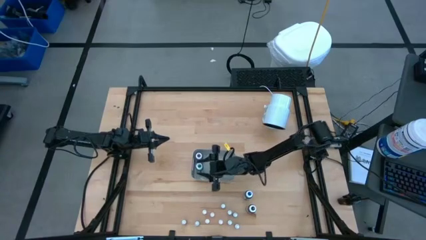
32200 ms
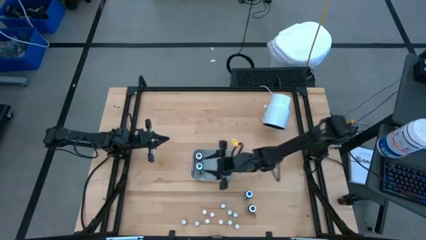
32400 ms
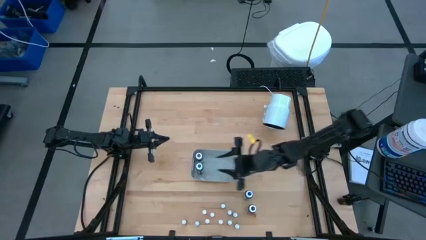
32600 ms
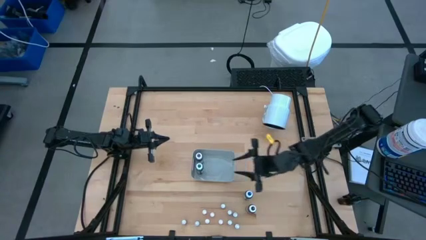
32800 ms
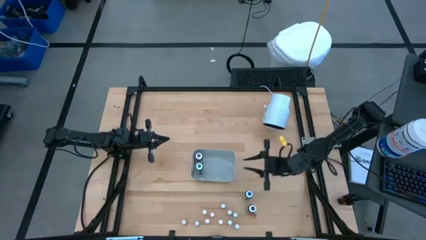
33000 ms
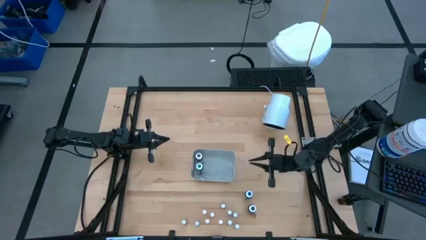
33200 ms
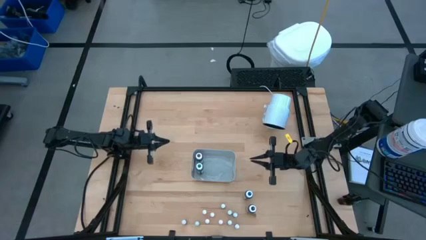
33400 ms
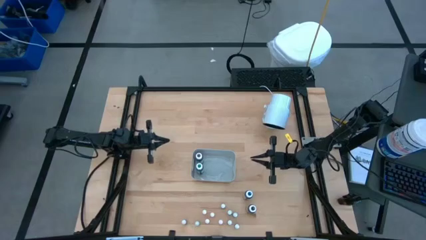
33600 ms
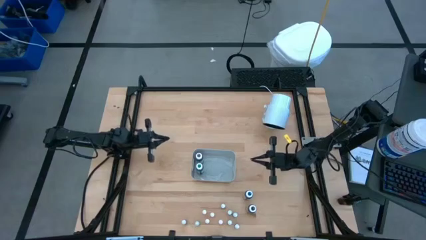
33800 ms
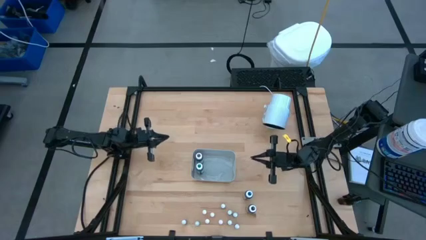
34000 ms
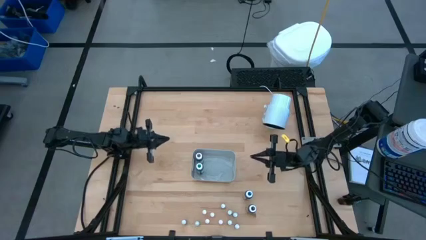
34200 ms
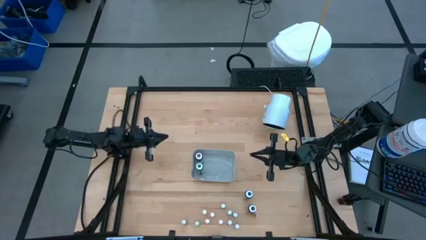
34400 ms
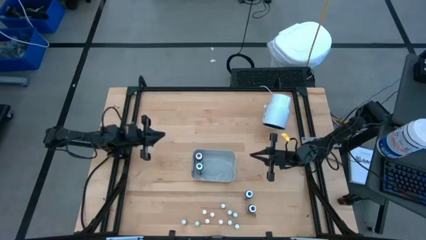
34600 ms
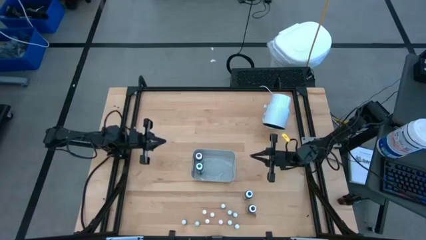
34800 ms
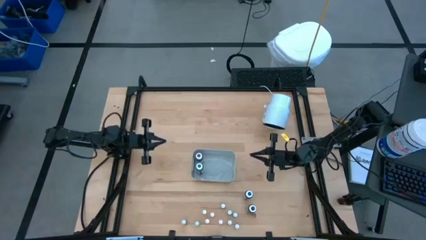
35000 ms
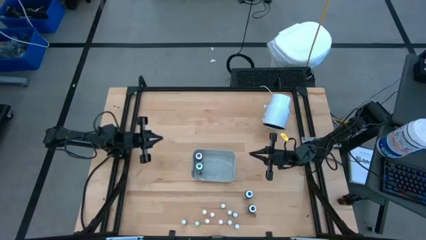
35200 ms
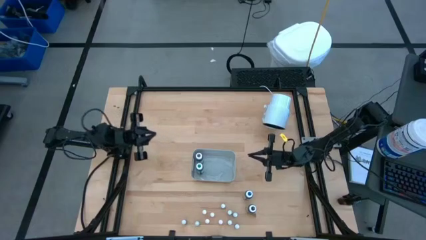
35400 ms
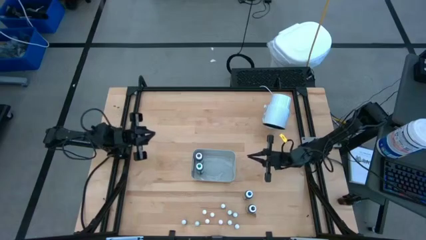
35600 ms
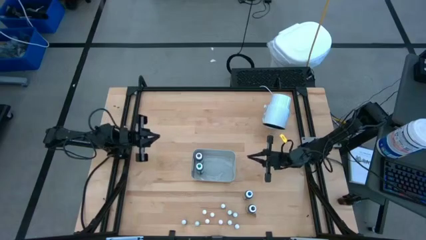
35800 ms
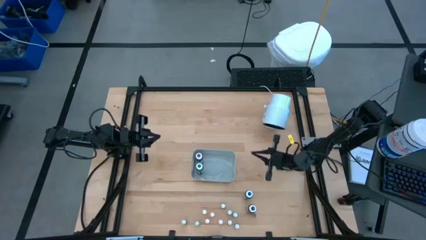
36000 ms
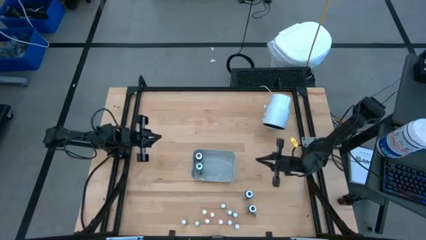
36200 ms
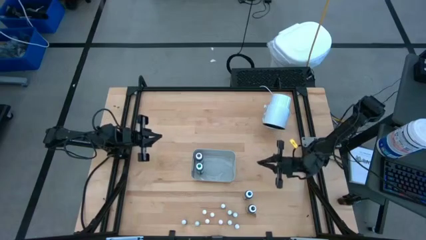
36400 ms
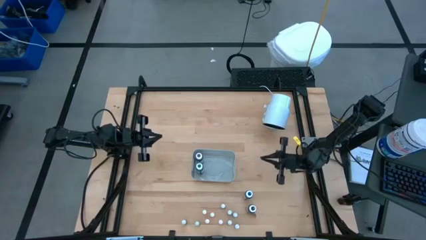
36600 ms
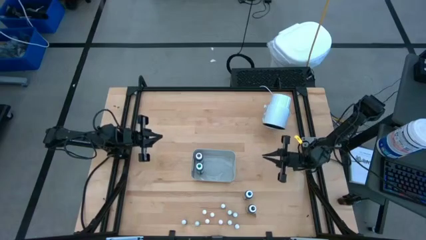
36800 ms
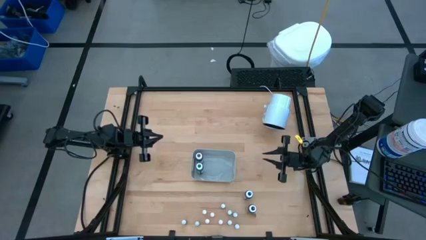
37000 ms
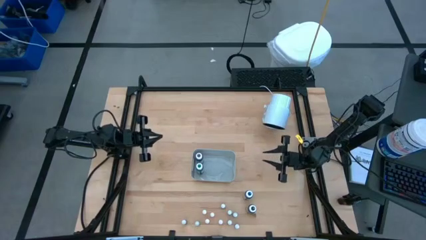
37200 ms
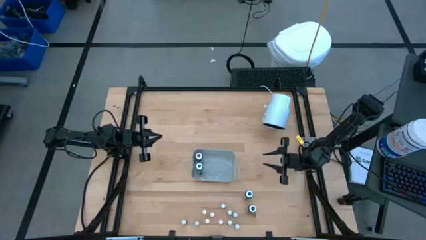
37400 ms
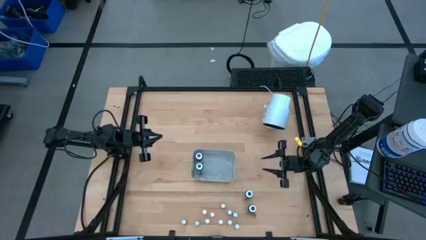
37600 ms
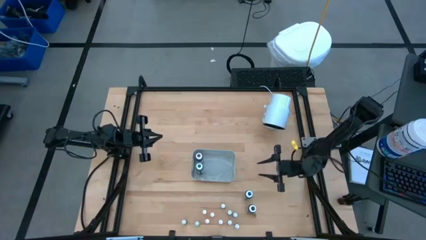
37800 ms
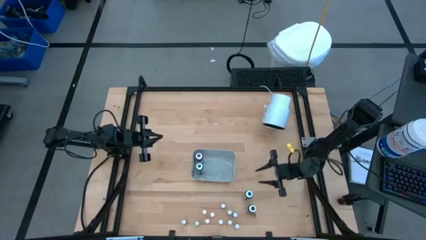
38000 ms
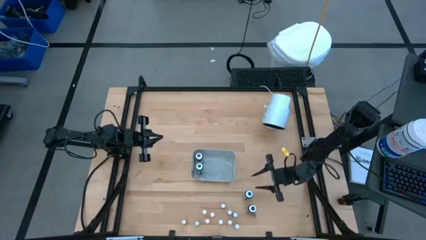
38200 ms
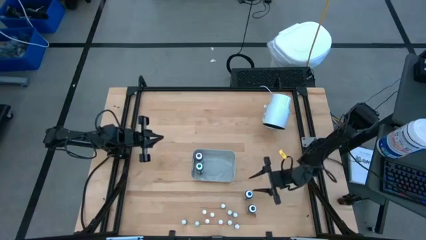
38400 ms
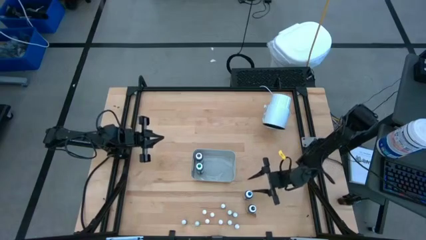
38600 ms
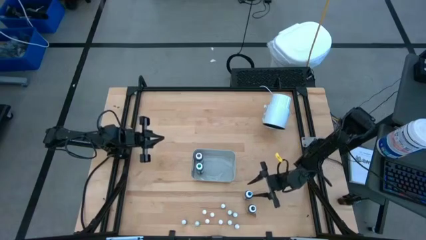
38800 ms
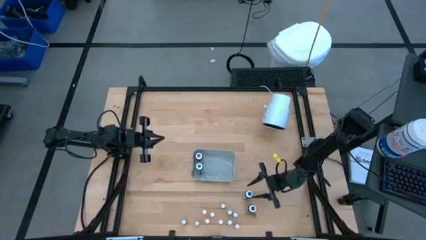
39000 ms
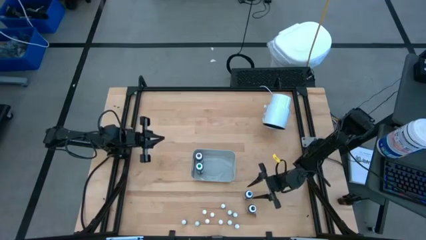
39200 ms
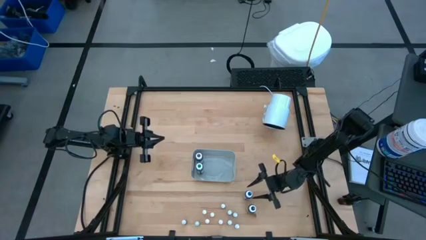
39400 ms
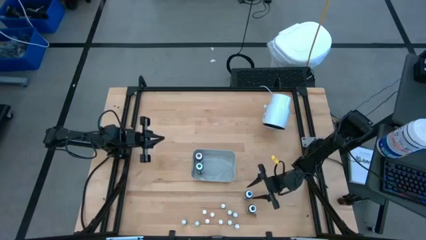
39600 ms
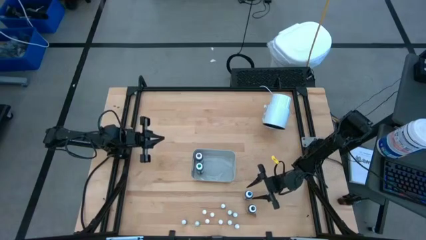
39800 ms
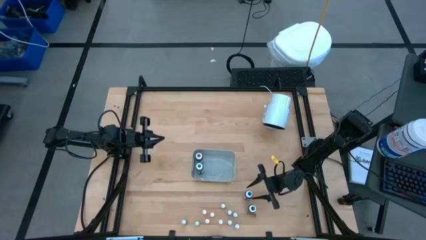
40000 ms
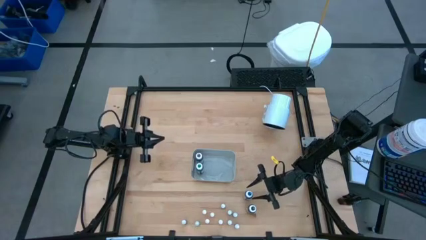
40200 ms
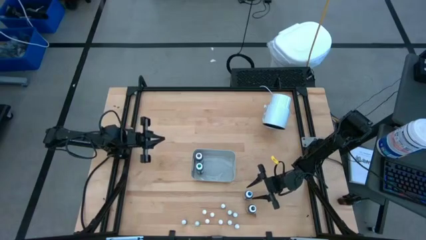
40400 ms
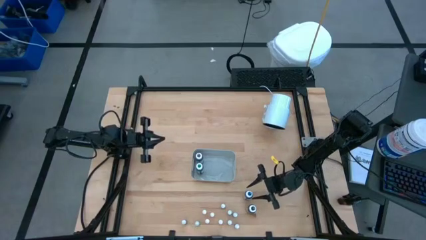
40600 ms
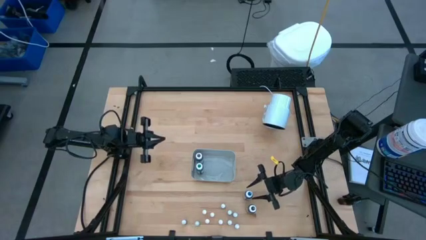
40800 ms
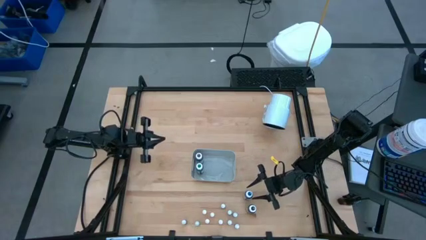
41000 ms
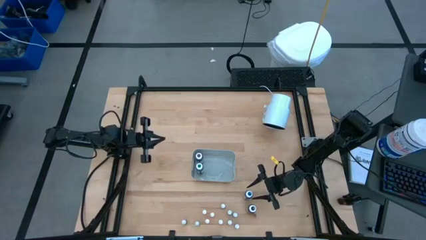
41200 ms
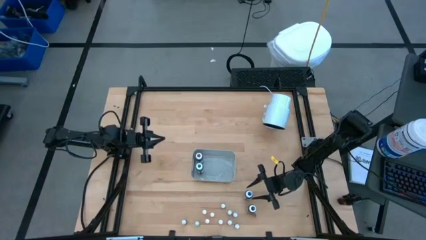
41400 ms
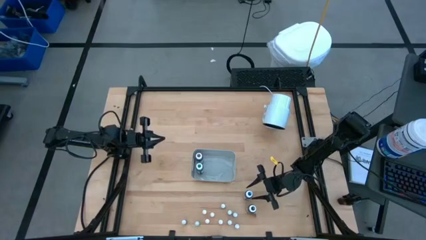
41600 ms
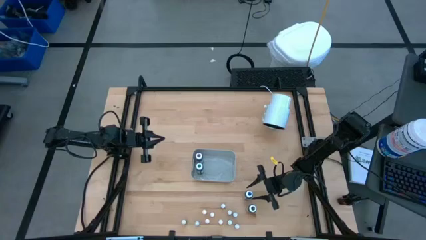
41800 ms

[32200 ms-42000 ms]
Task: Pick & Place food coloring
Put the big blue food coloring bottle into the gray bin

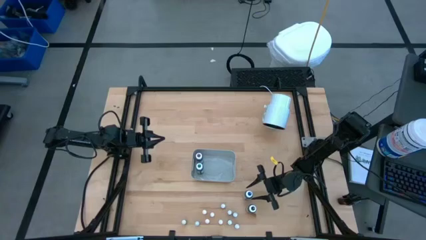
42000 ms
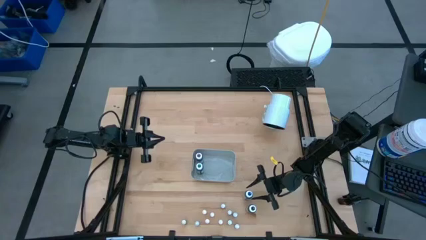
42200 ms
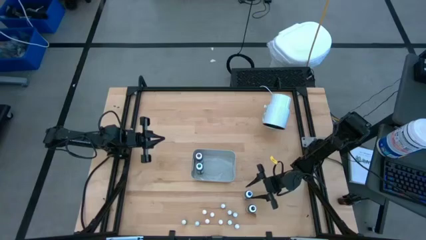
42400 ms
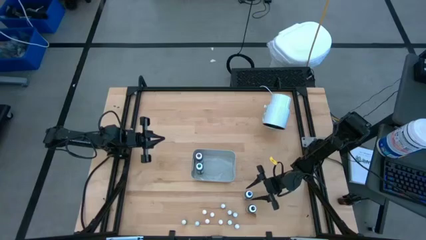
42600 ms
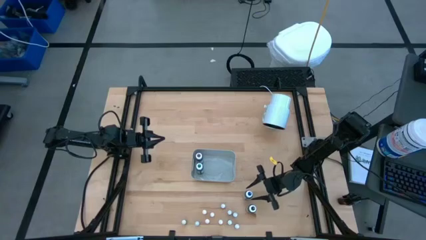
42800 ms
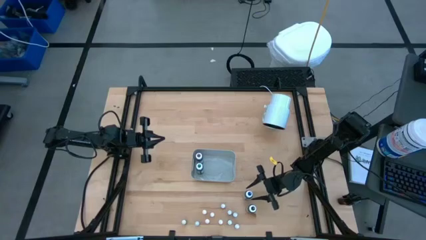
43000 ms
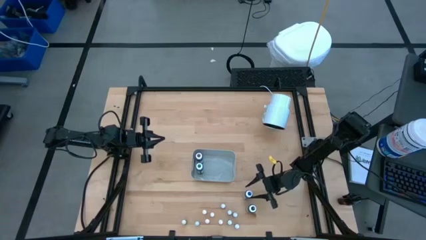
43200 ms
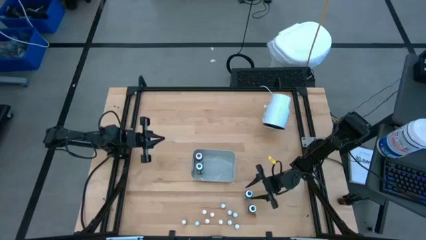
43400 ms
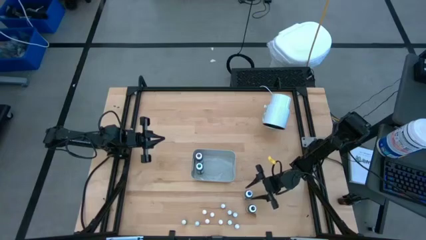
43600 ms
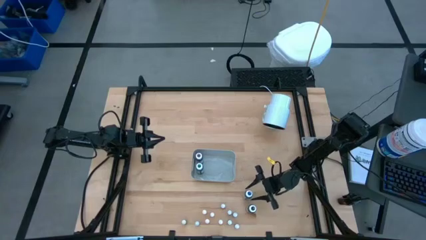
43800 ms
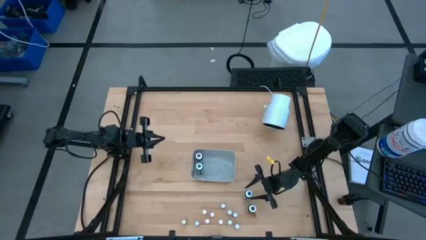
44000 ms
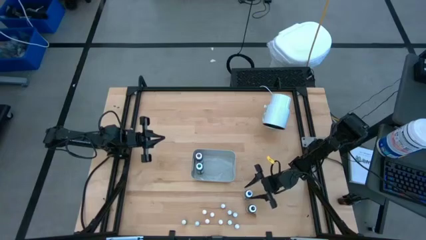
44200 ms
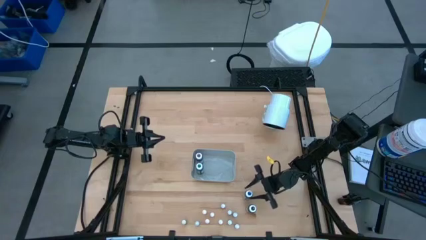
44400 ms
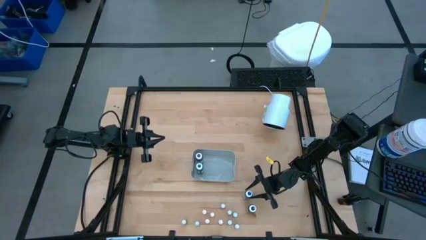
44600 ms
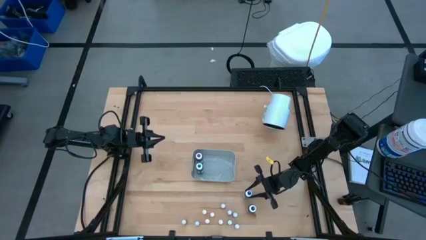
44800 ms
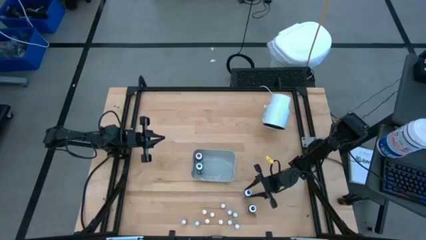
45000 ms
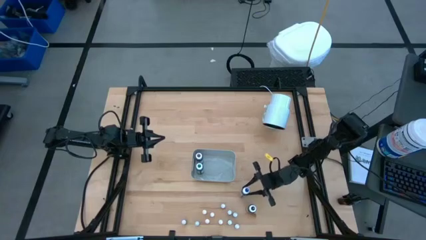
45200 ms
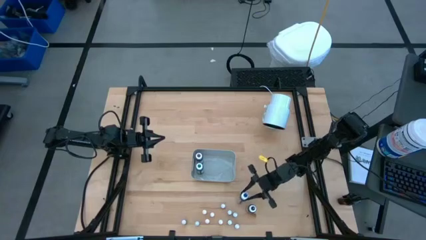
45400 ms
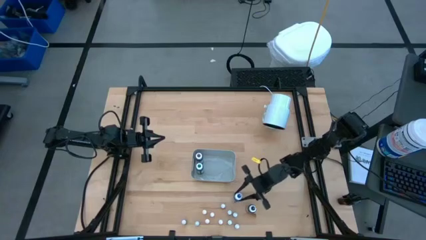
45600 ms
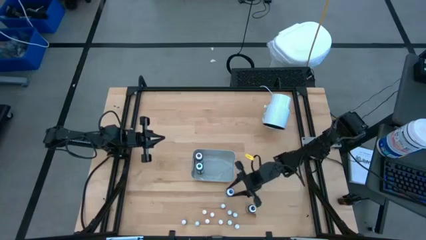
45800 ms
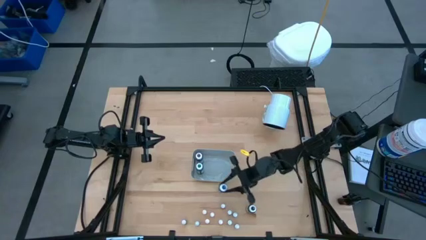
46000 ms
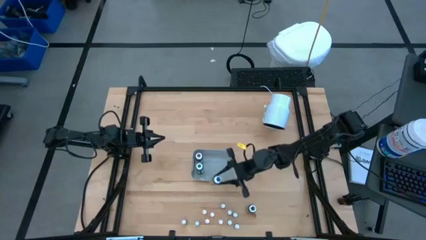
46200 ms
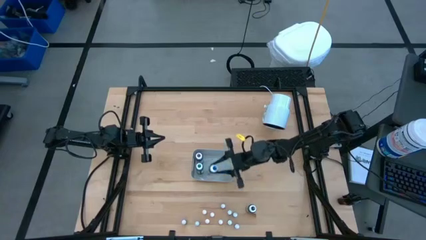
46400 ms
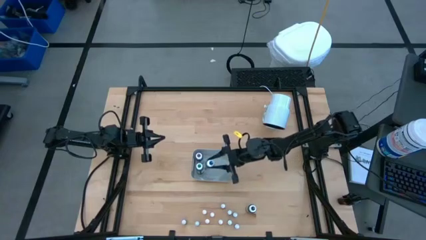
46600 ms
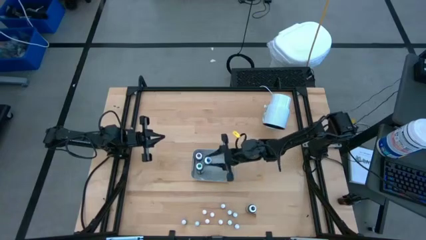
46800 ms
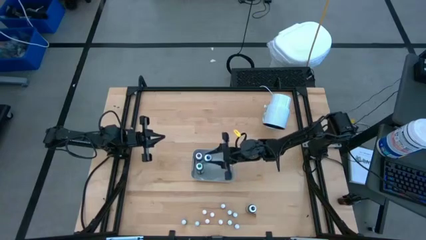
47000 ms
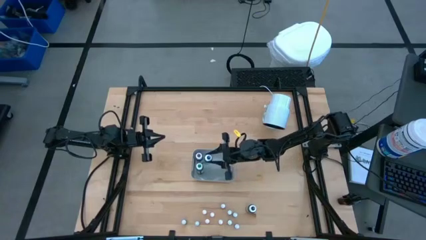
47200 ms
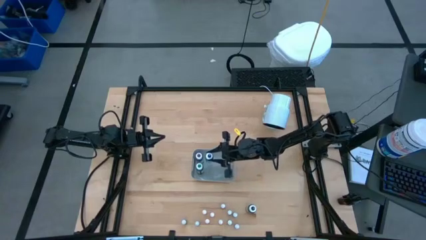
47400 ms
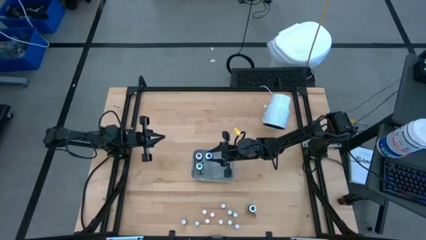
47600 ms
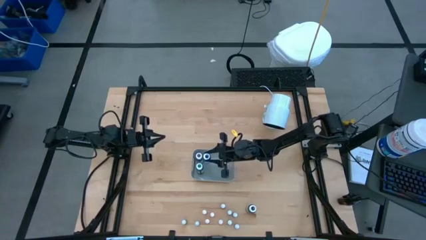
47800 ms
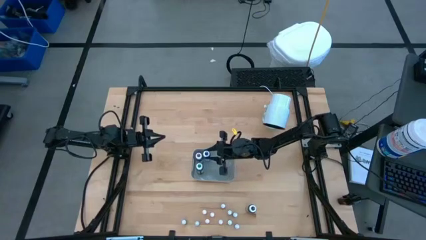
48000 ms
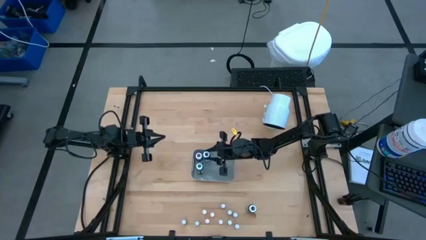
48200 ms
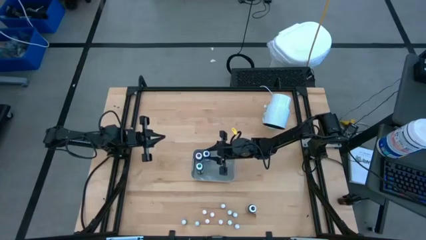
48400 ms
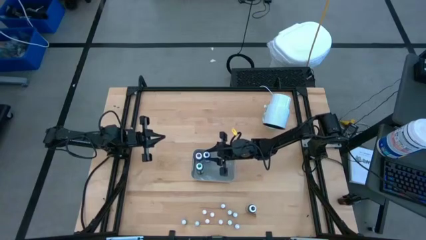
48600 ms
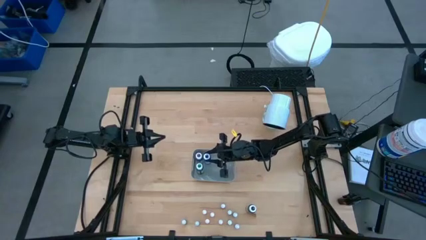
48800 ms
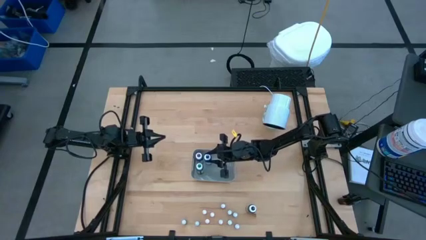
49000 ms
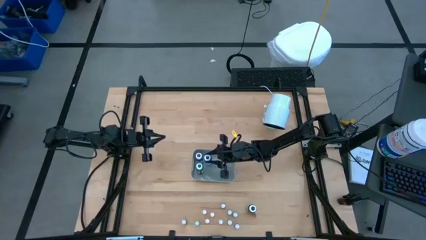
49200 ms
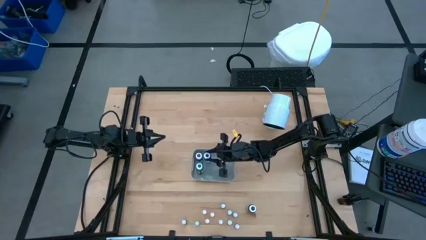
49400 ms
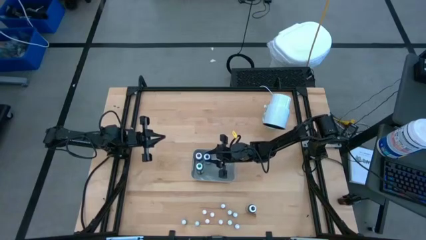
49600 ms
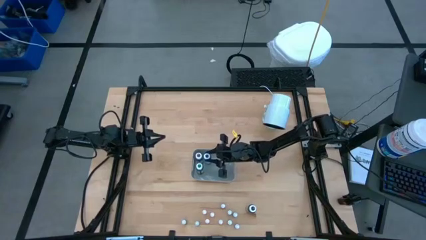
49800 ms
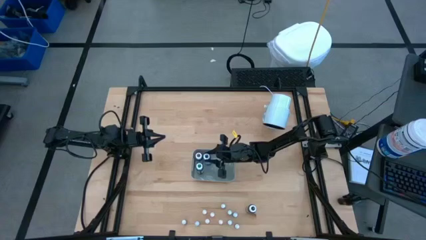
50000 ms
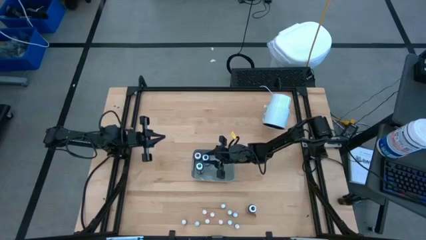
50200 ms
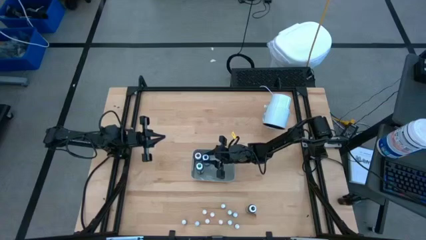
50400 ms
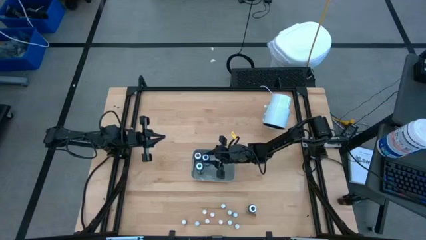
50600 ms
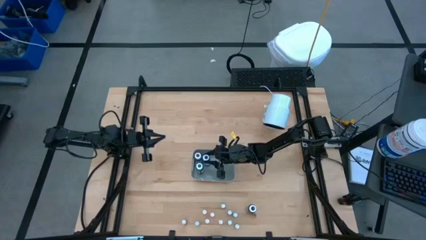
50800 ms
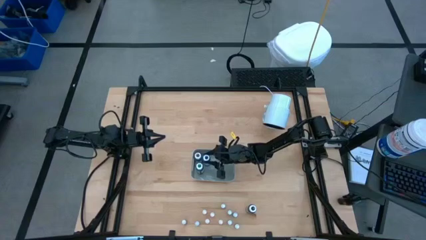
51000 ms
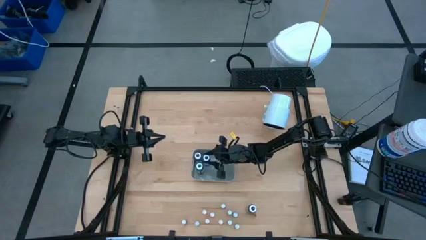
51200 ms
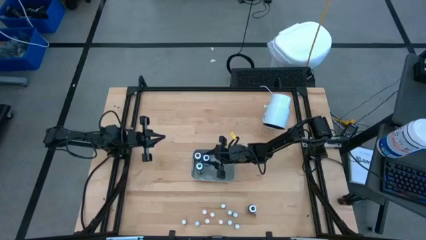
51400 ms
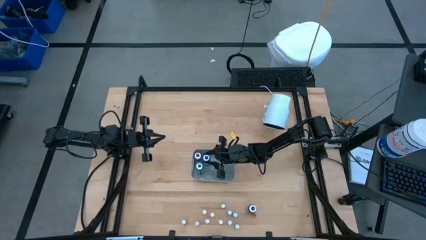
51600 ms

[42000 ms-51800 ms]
Put the big blue food coloring bottle into the gray bin
